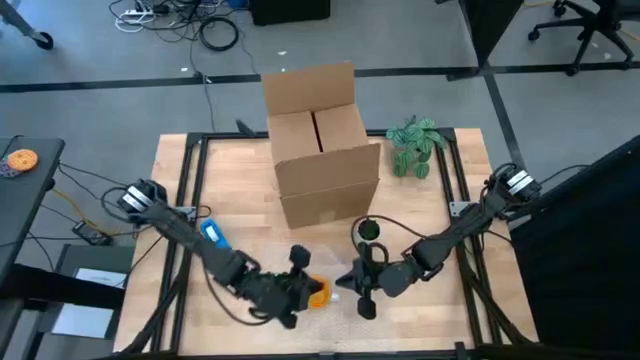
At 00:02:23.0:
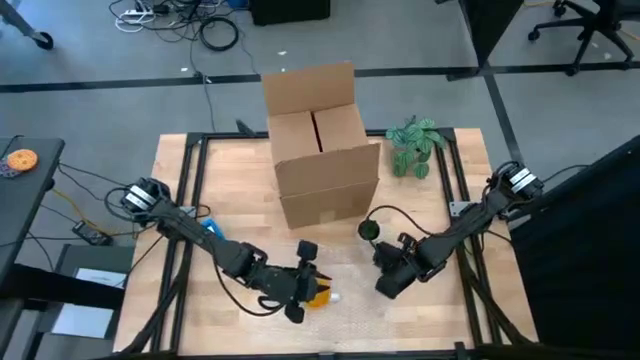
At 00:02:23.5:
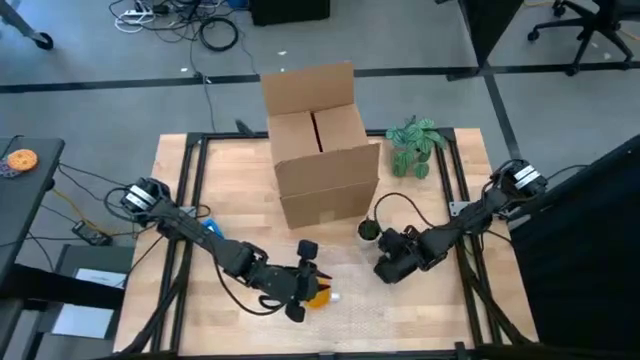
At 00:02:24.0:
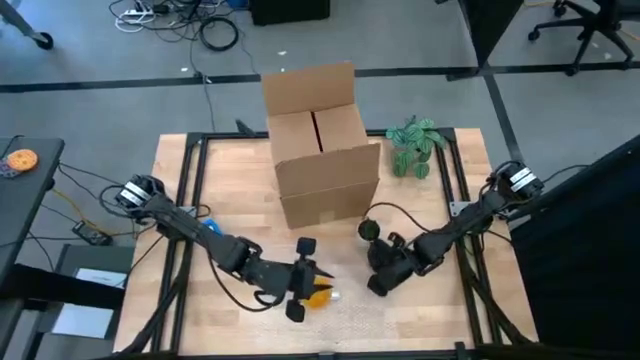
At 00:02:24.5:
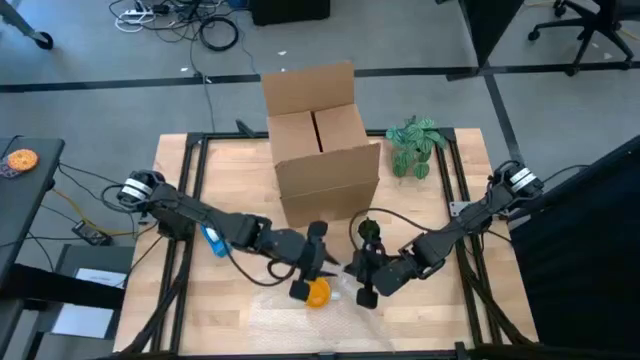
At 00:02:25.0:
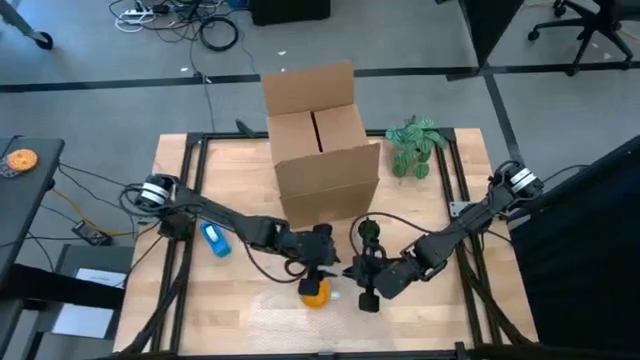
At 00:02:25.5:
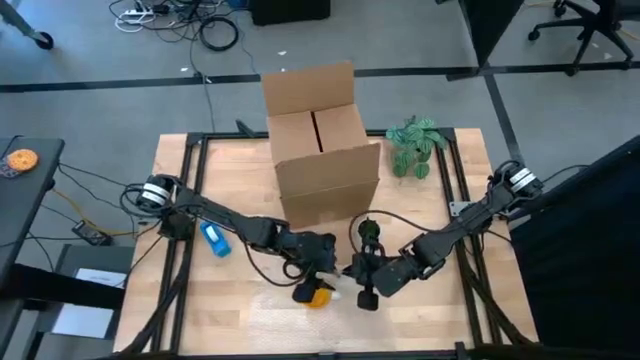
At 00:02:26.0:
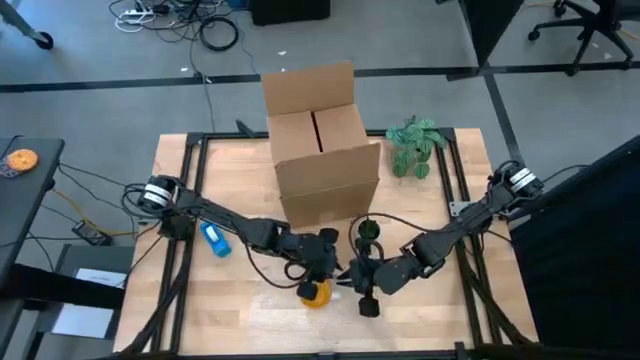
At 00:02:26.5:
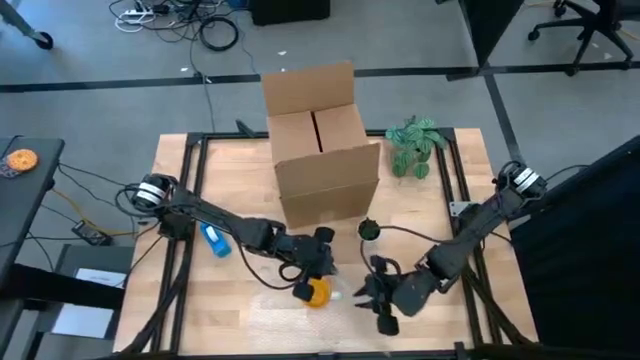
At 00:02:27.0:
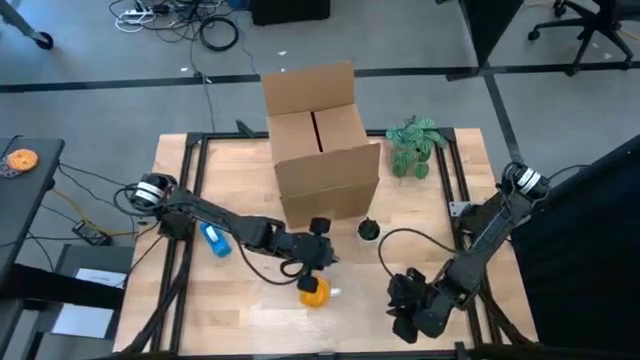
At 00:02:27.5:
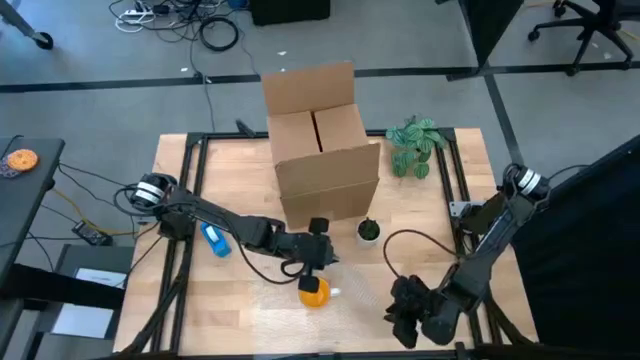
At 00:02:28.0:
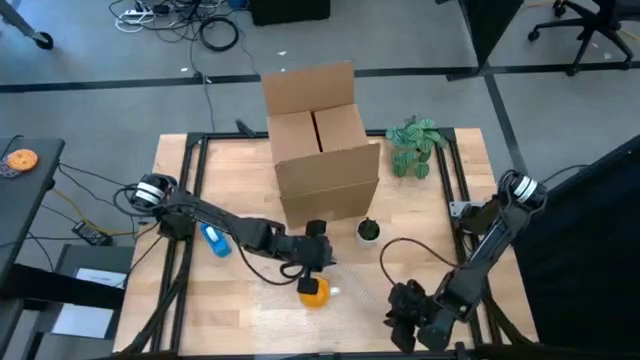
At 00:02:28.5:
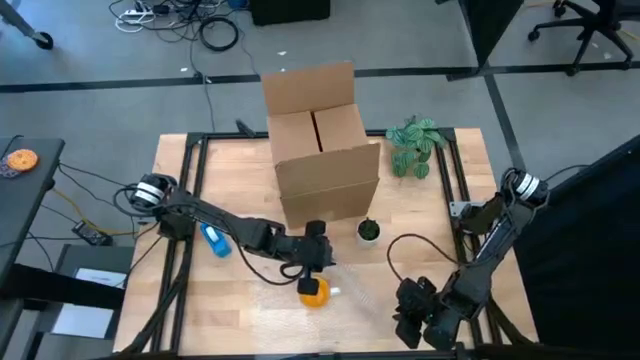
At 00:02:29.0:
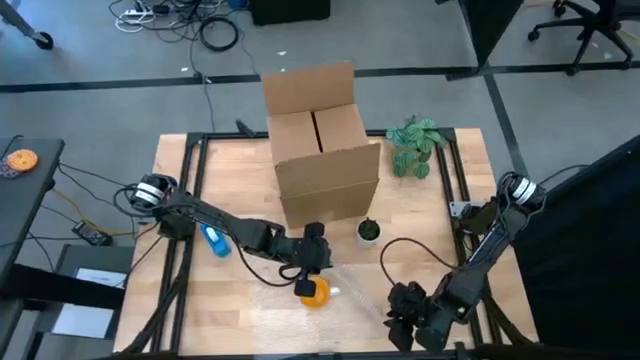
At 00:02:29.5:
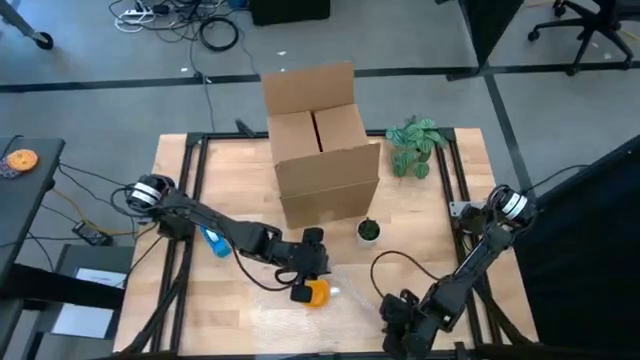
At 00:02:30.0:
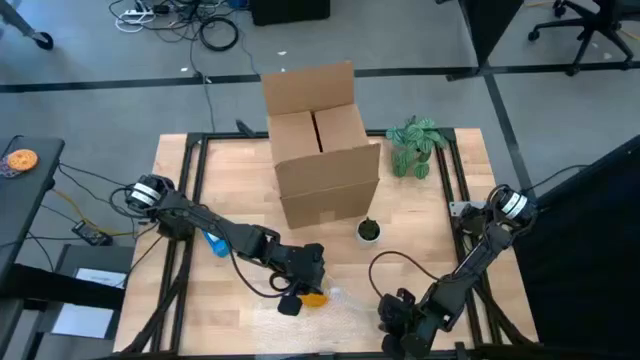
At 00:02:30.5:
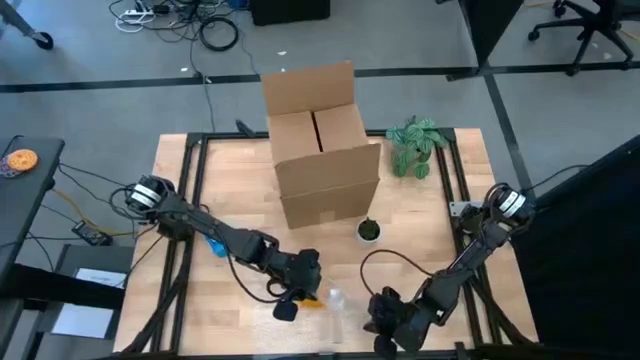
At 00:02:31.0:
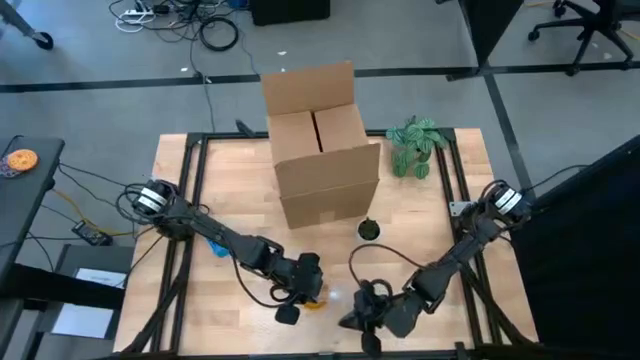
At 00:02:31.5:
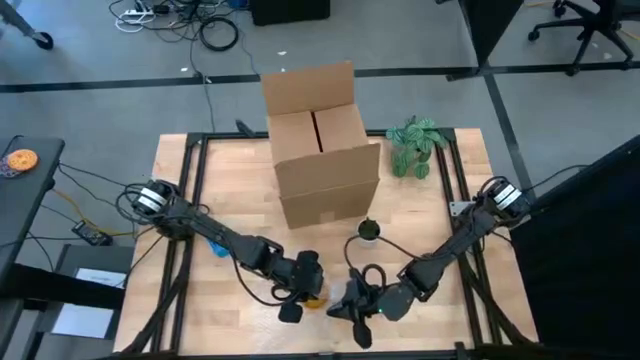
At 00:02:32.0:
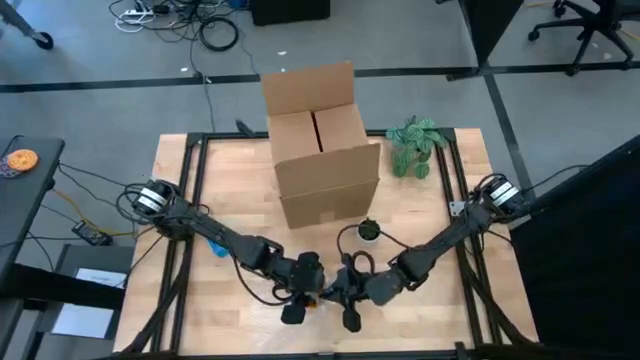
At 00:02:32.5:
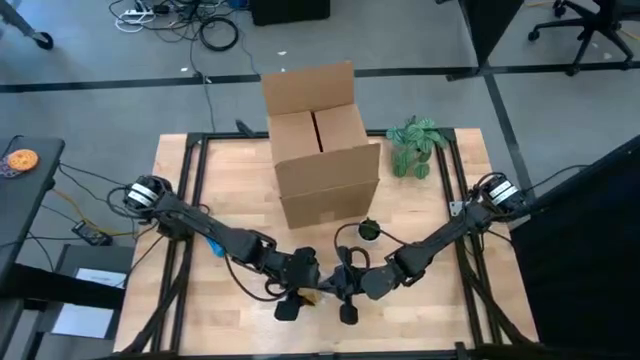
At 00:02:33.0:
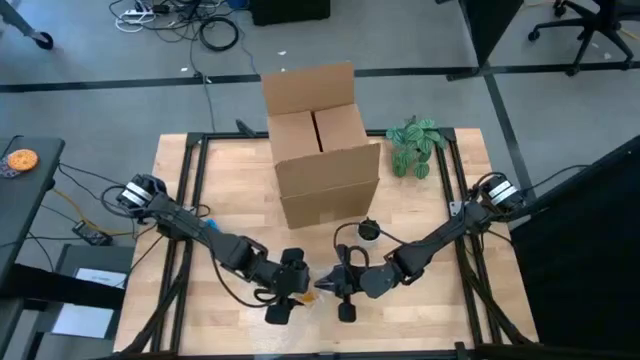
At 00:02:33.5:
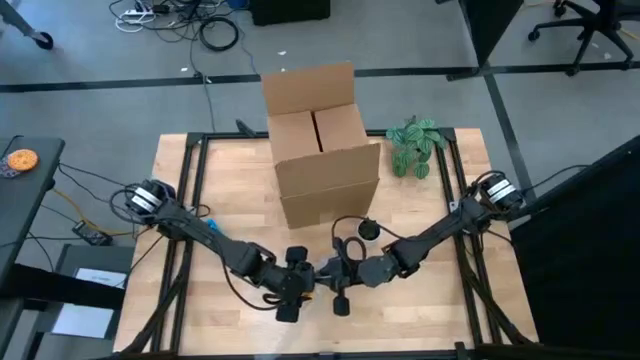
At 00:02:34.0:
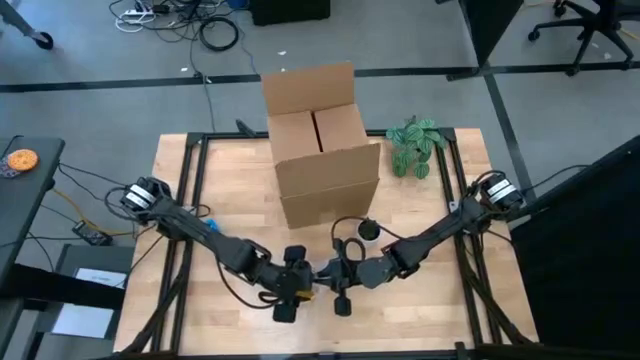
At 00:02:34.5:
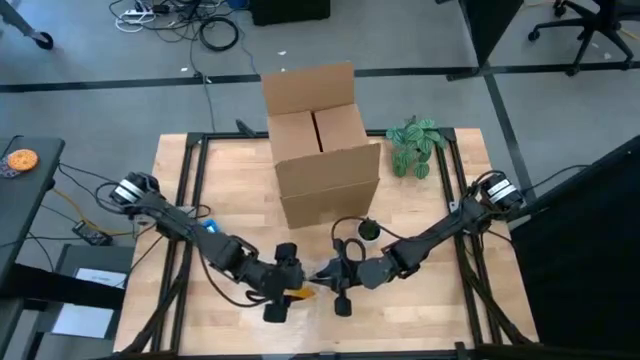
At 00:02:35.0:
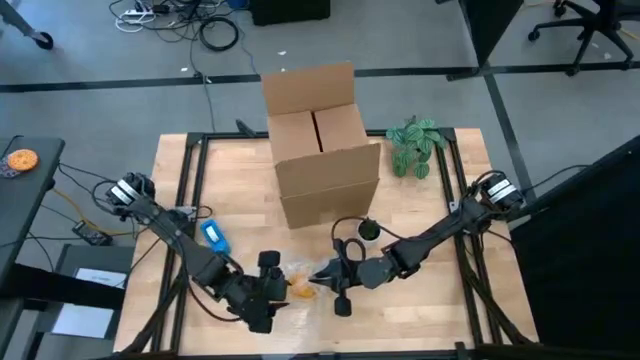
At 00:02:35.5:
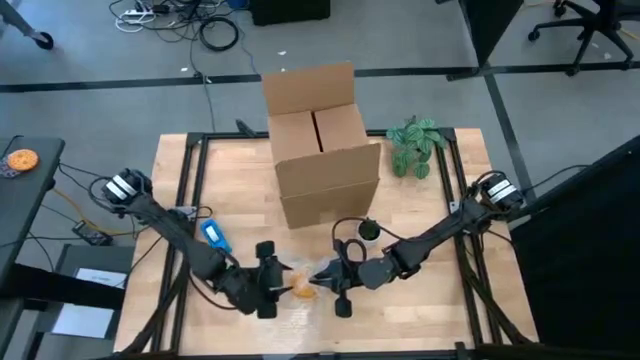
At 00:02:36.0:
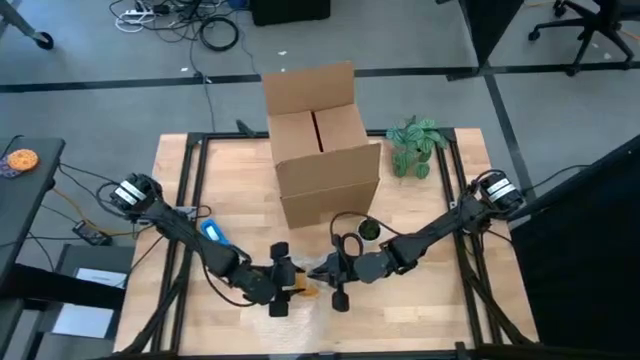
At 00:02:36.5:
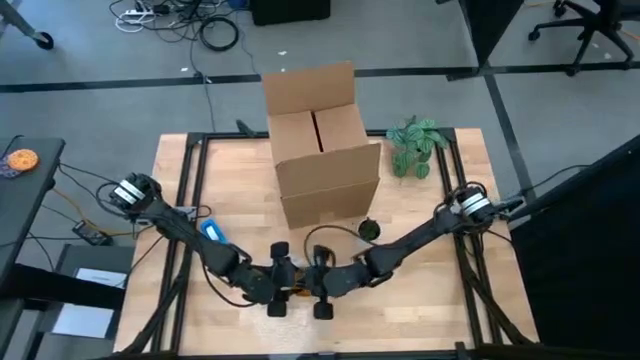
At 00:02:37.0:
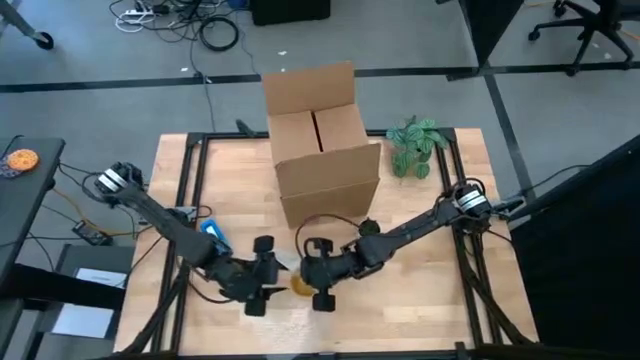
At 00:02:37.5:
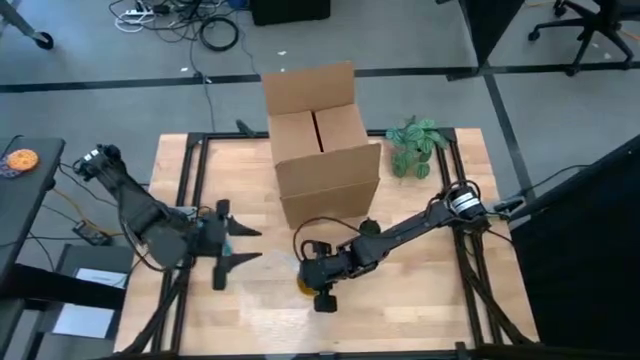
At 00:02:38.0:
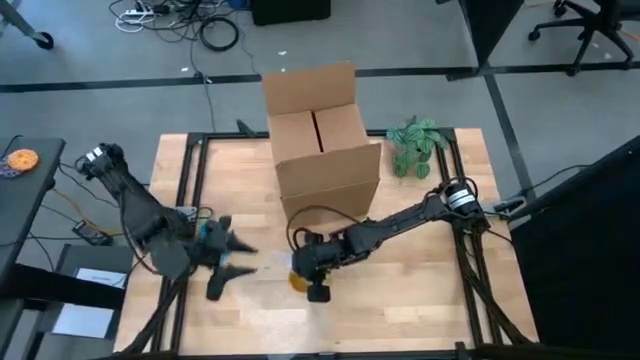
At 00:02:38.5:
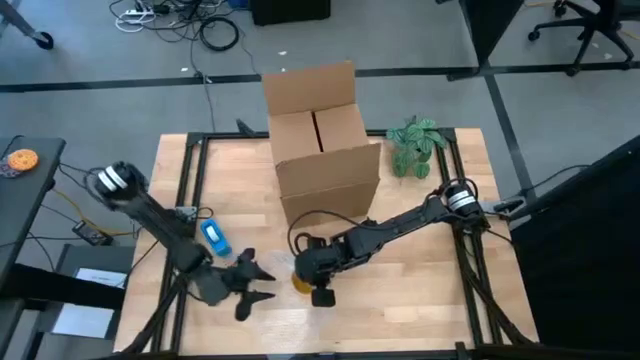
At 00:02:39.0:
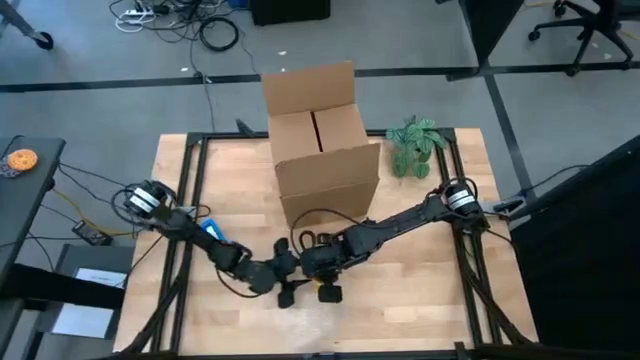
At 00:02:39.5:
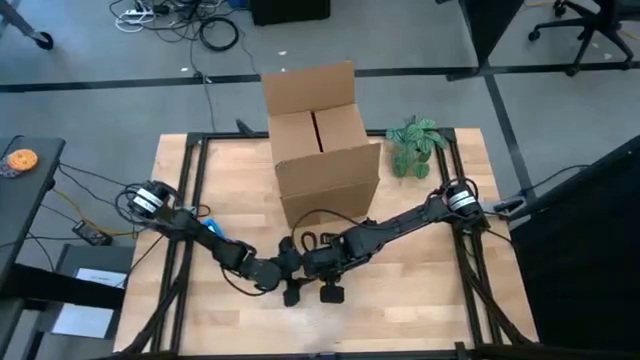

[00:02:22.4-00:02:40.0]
Task: wrap mug
Wrap the yellow mug with the transparent bubble wrap
